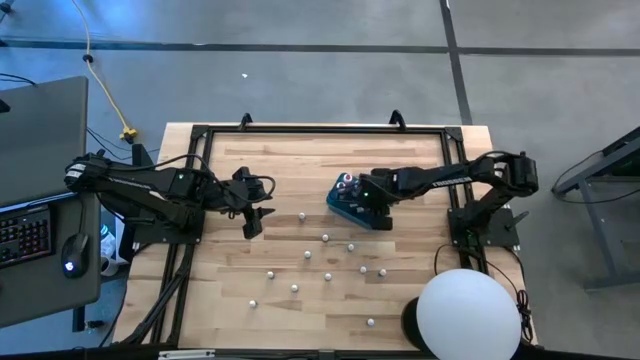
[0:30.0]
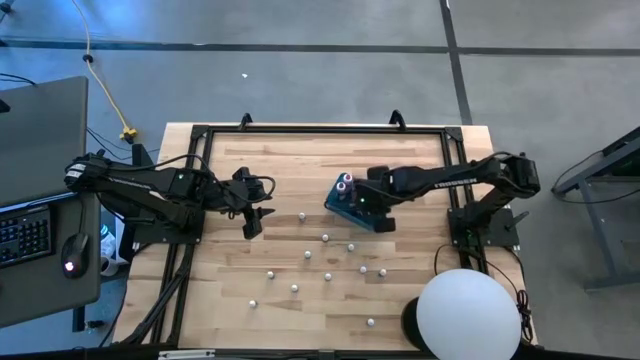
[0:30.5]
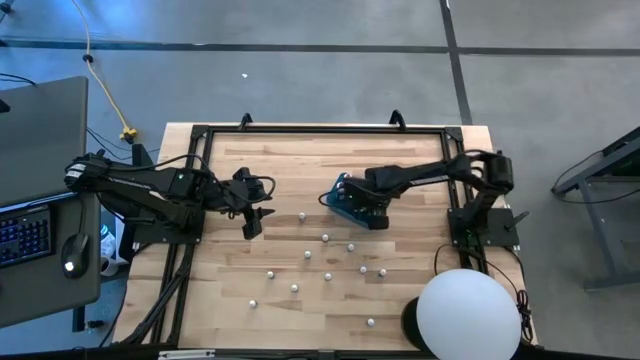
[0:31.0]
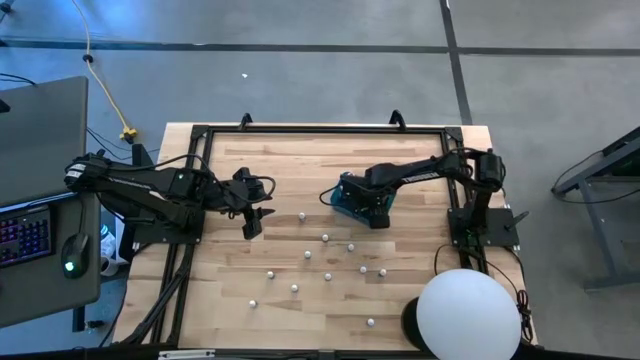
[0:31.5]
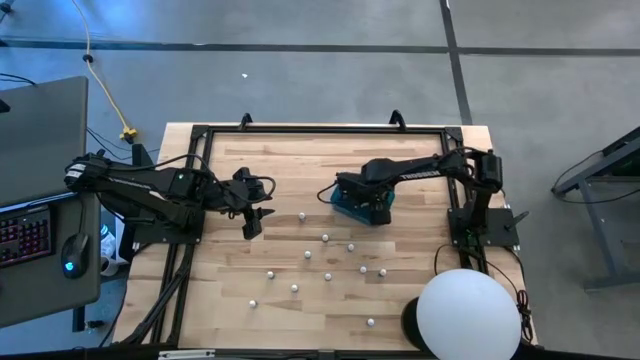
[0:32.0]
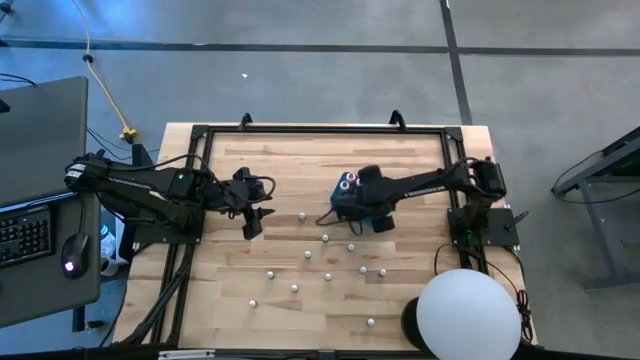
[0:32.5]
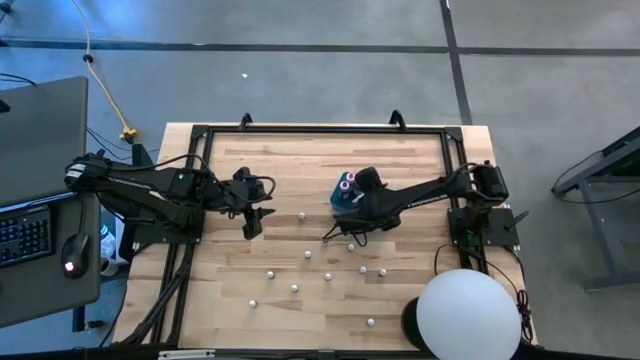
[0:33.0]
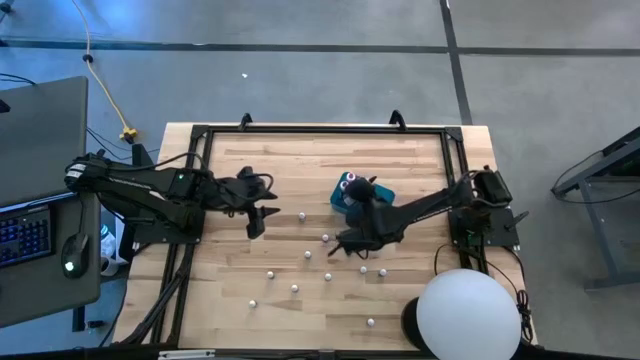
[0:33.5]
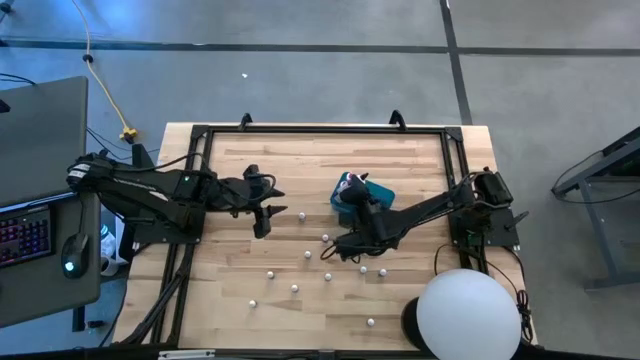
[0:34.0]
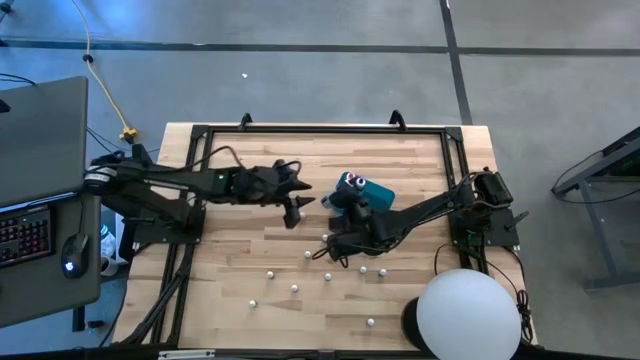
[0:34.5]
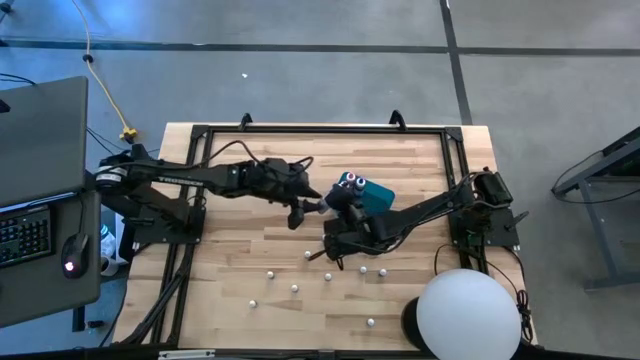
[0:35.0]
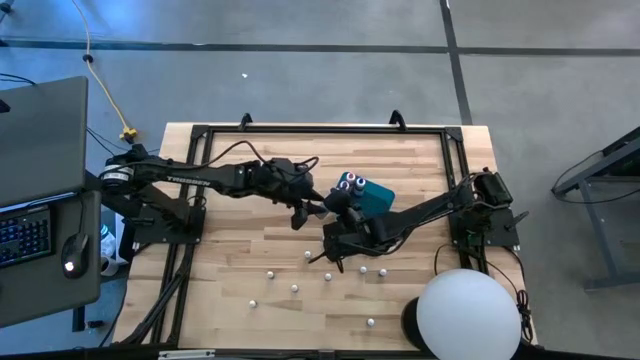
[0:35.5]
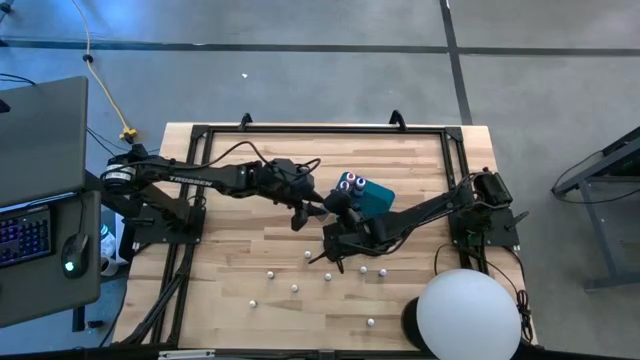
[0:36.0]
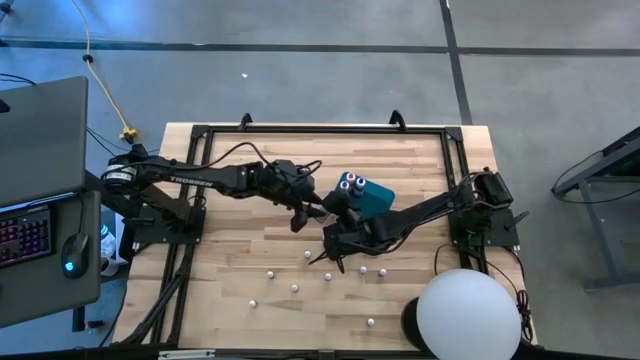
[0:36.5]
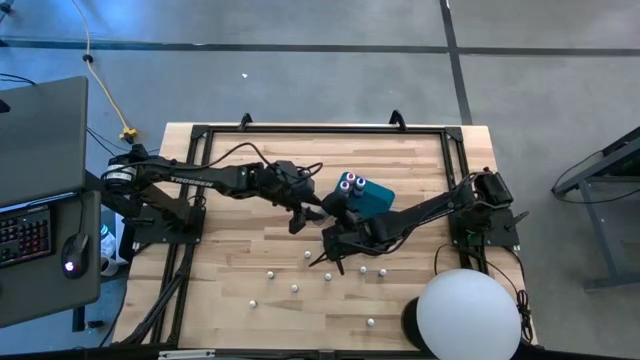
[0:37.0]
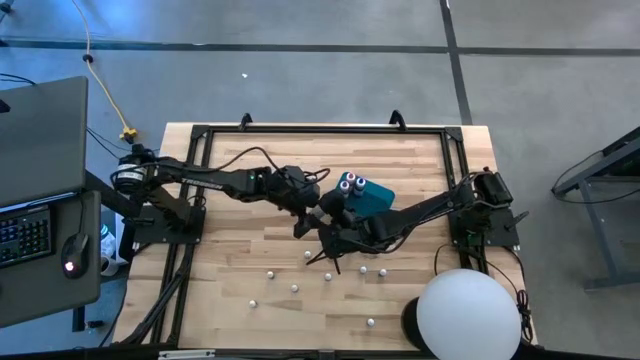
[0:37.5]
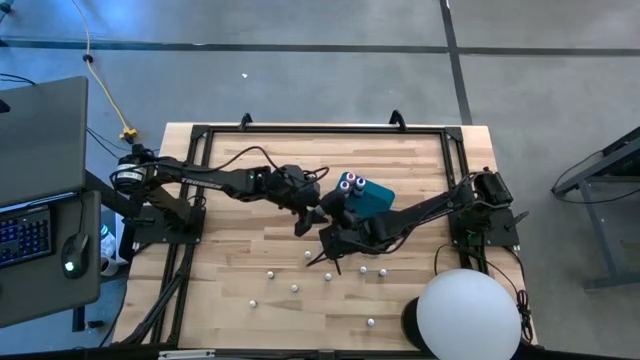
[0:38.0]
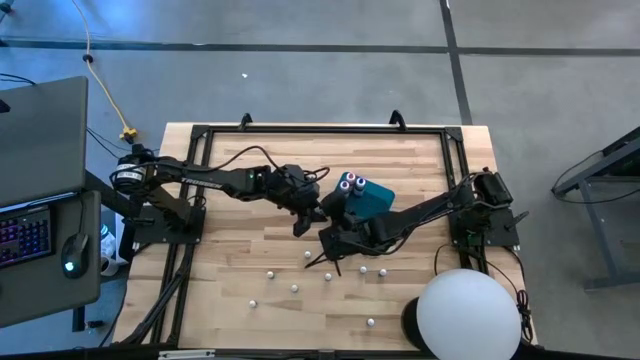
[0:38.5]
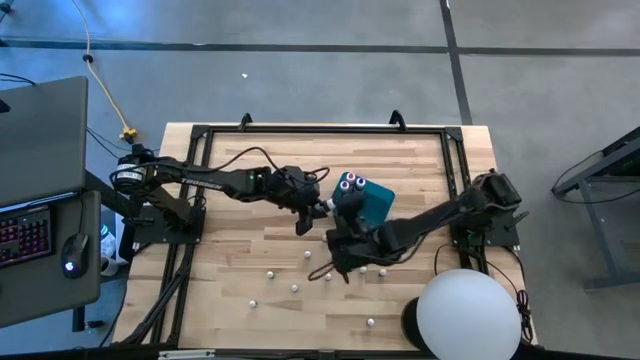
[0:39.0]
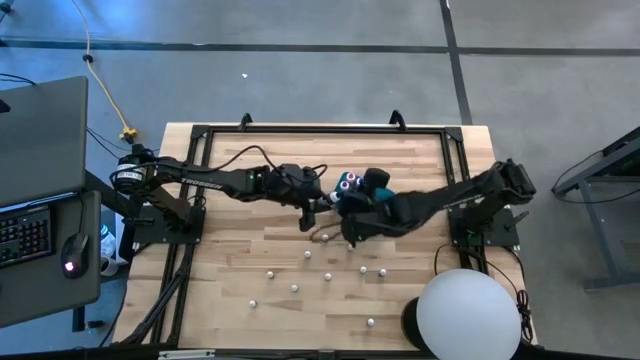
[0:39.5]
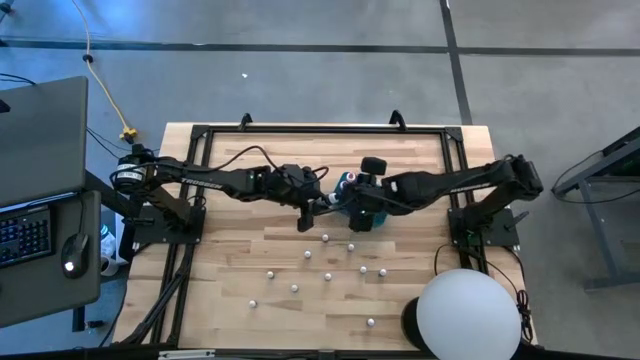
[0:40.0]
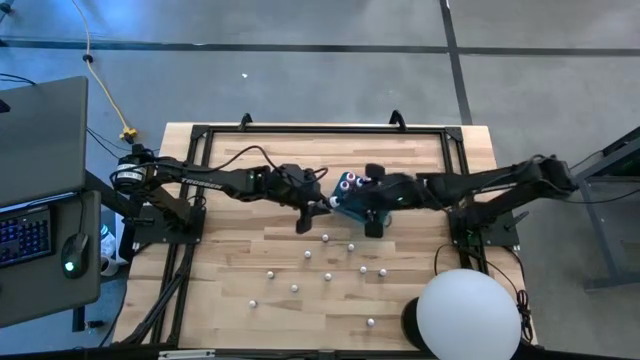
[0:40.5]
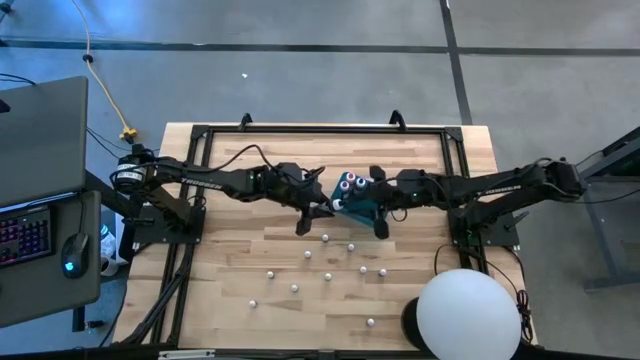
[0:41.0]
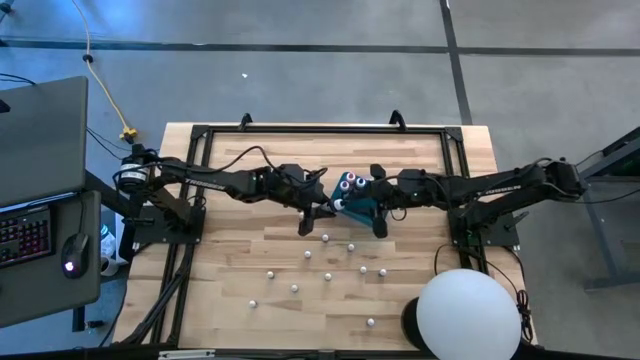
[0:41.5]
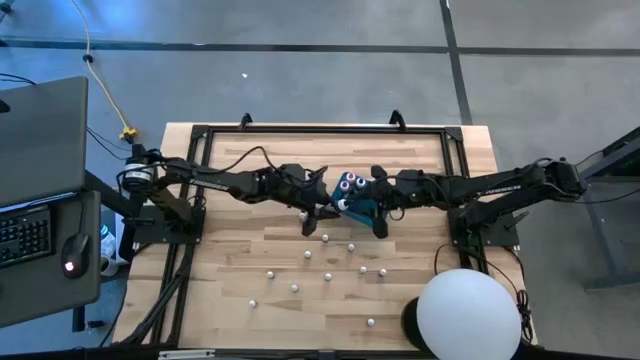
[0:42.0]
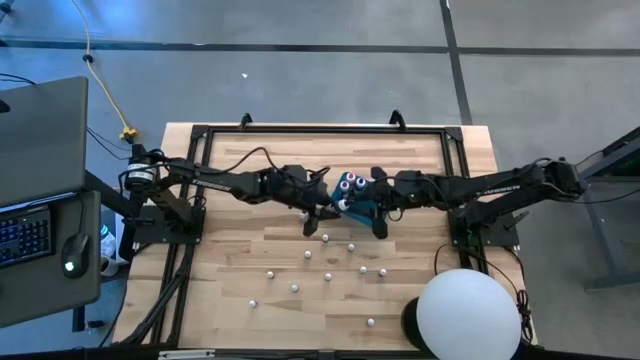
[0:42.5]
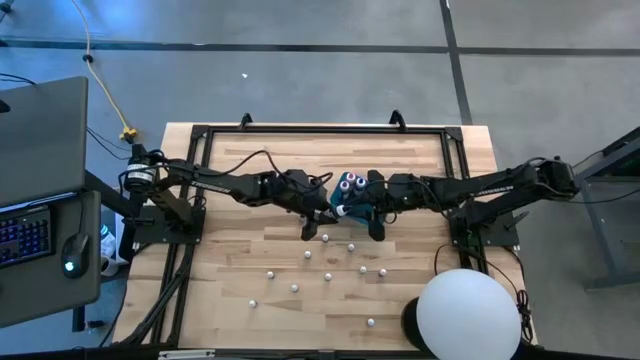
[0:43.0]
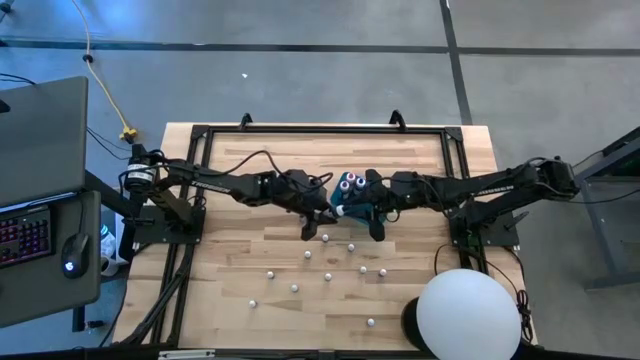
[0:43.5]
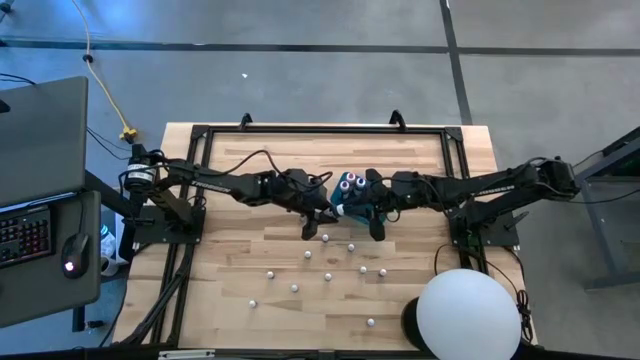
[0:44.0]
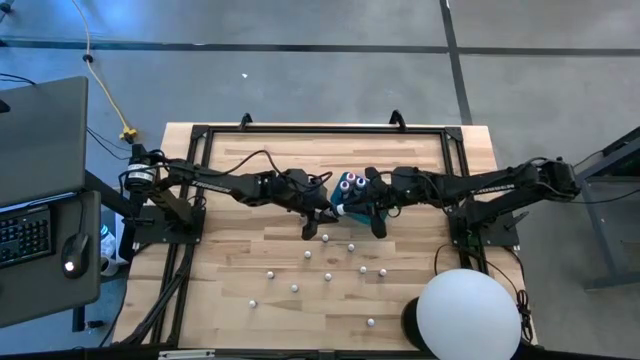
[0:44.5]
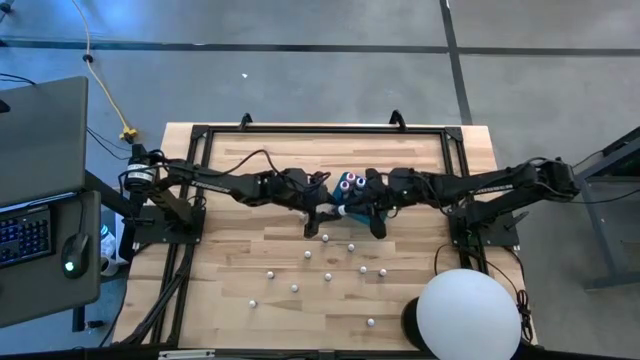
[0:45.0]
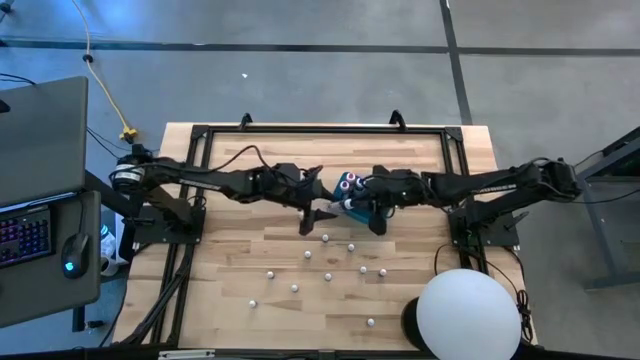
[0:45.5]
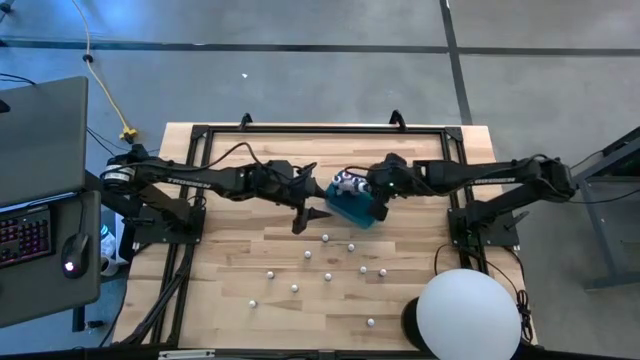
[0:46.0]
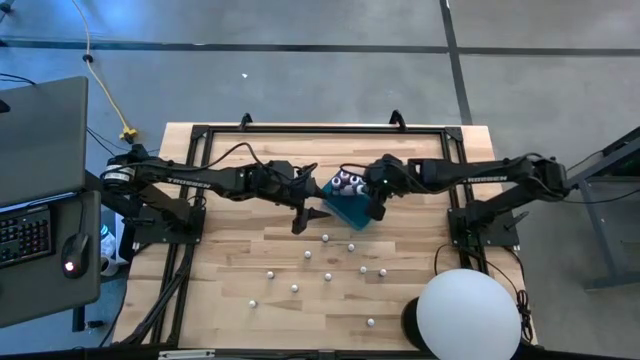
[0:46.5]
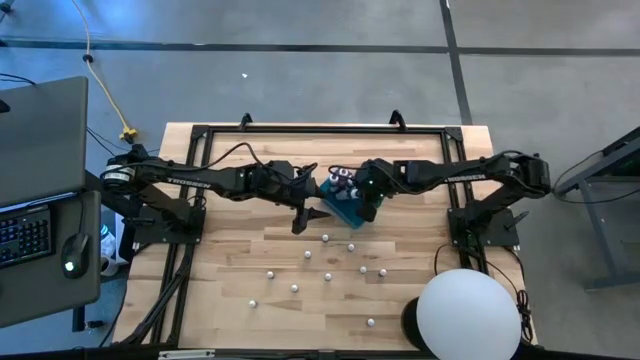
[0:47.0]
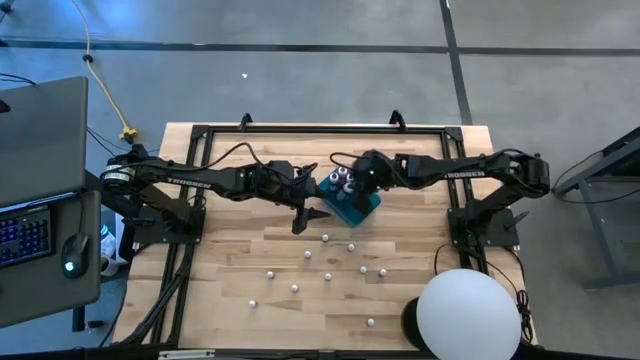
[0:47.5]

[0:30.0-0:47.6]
Task: Pick & Place food coloring
Put the large black food coloring bottle into the blue container

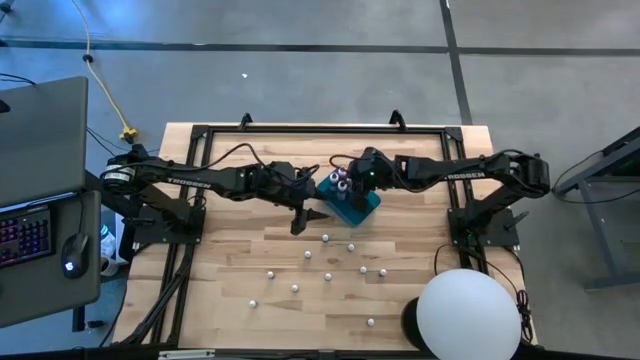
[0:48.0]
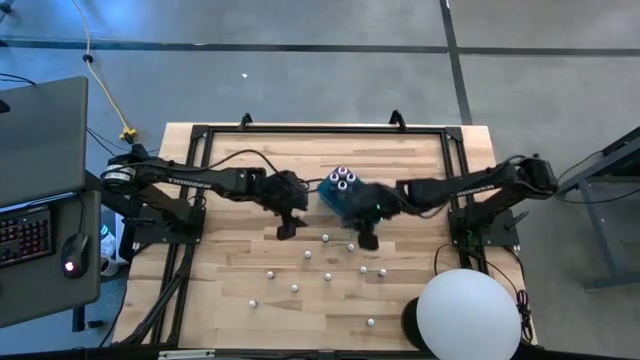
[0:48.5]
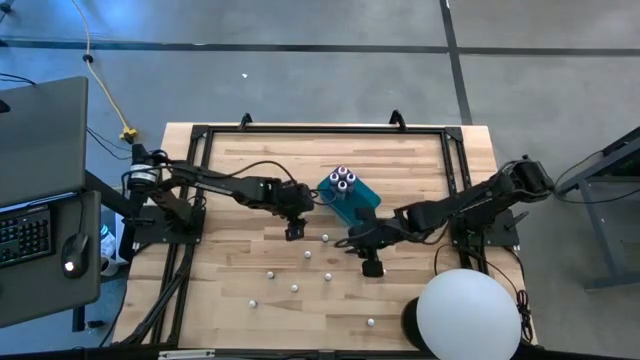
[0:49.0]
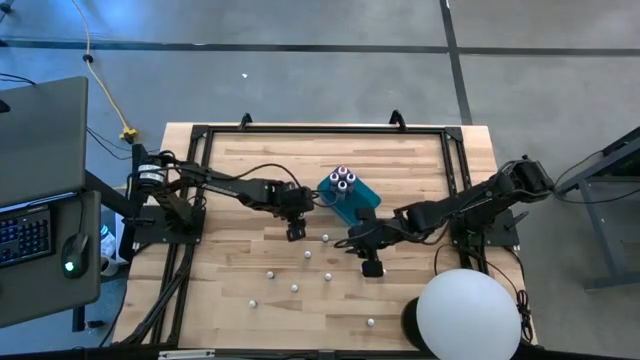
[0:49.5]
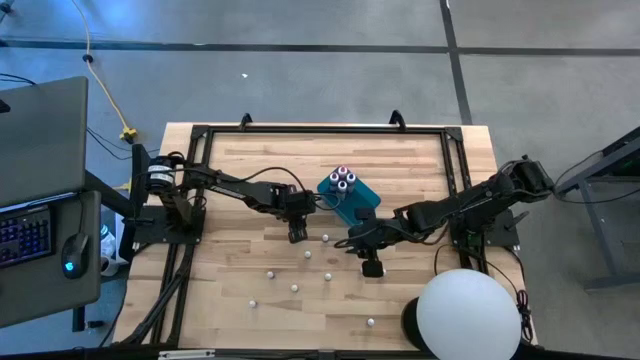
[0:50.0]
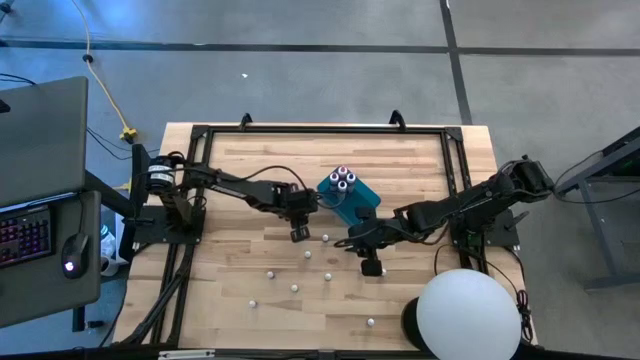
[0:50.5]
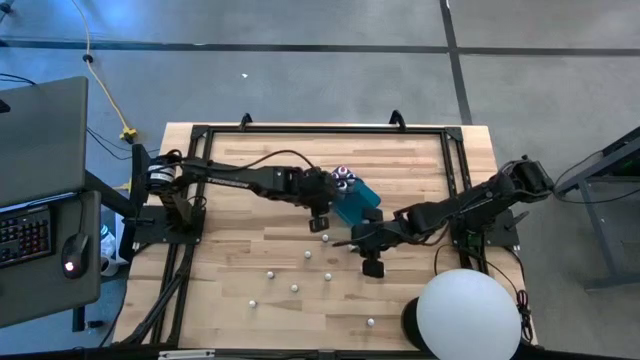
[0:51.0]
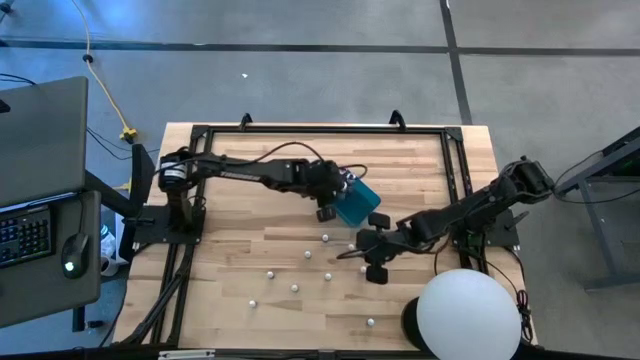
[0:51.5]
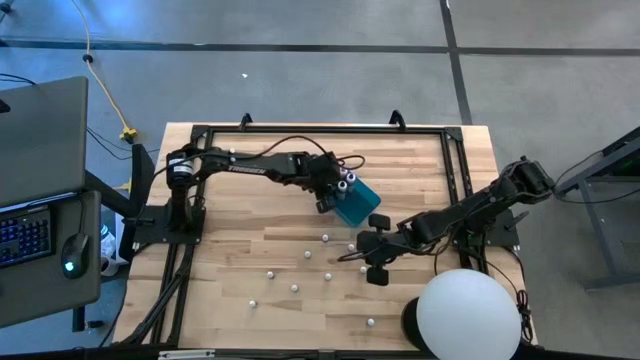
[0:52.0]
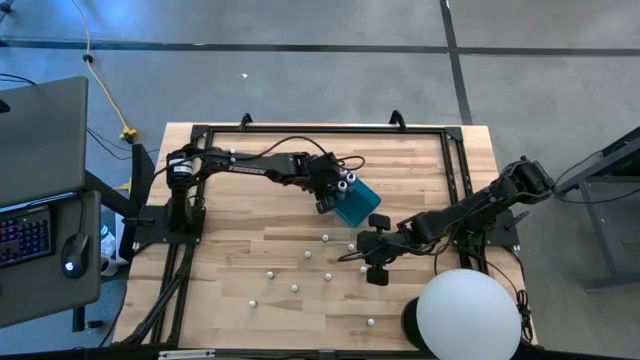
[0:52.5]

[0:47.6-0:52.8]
Put the small black food coloring bottle into the blue container
